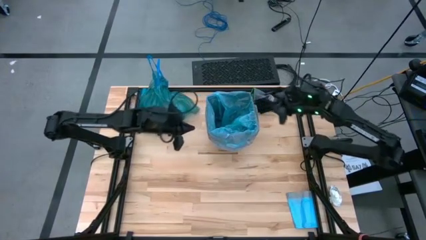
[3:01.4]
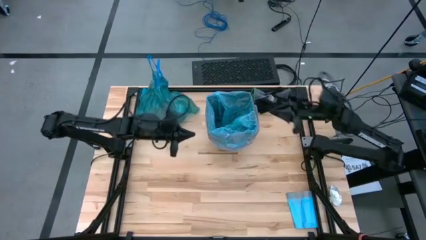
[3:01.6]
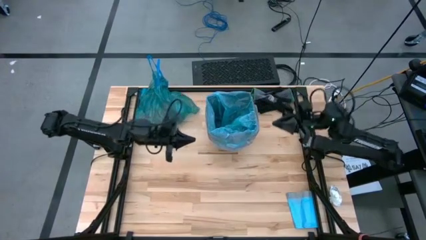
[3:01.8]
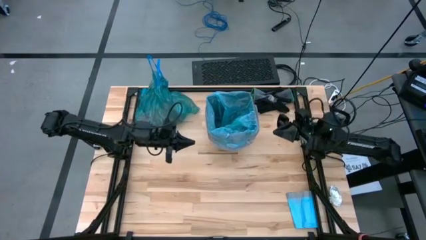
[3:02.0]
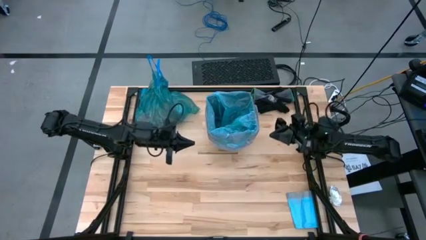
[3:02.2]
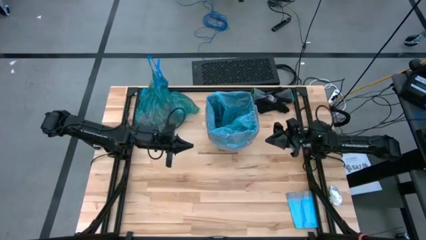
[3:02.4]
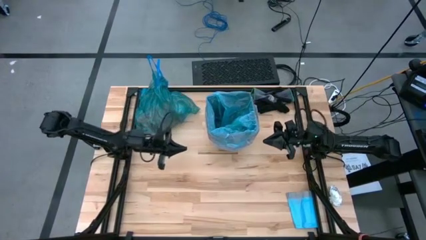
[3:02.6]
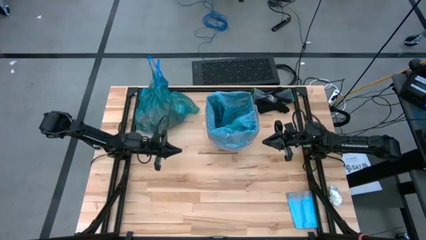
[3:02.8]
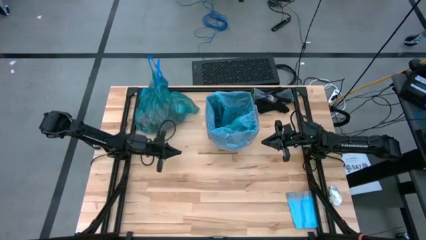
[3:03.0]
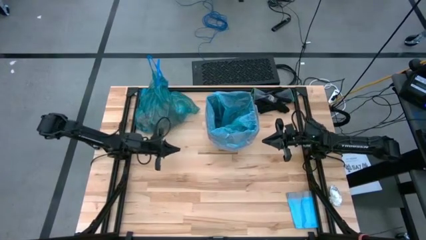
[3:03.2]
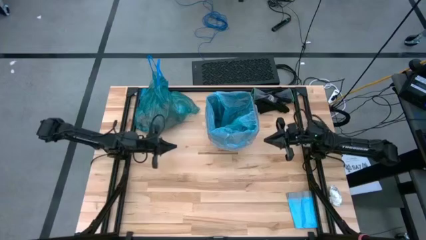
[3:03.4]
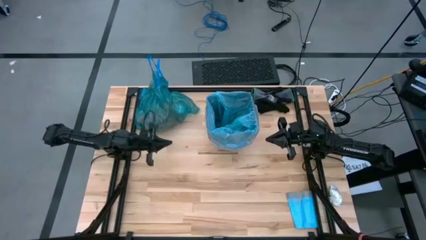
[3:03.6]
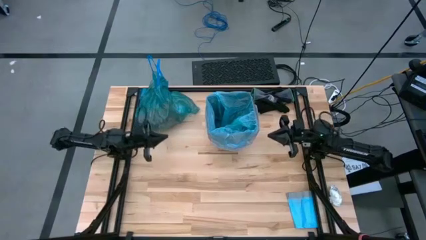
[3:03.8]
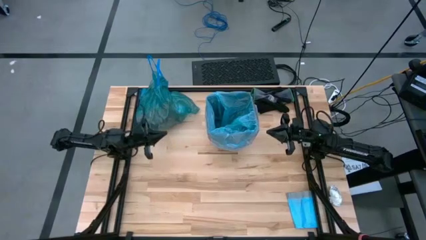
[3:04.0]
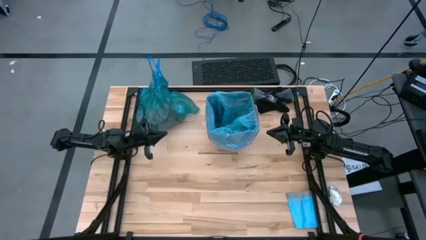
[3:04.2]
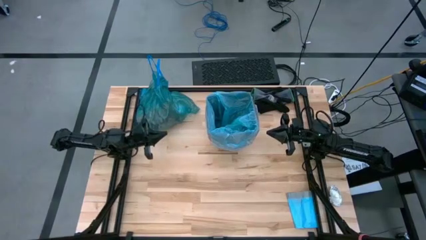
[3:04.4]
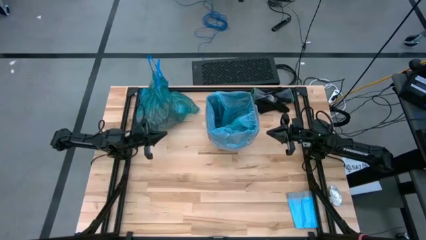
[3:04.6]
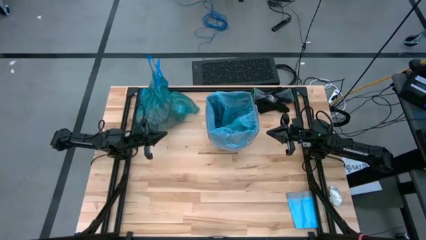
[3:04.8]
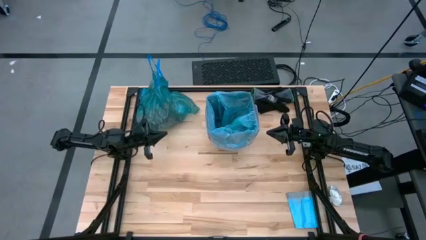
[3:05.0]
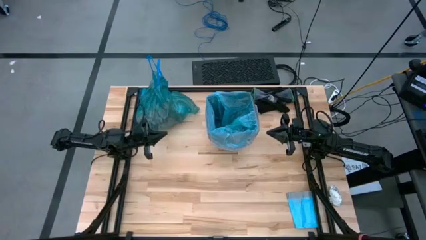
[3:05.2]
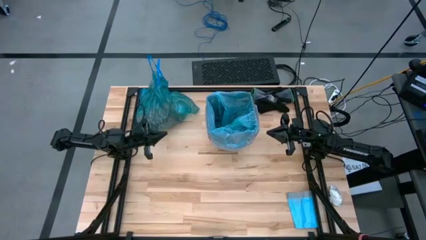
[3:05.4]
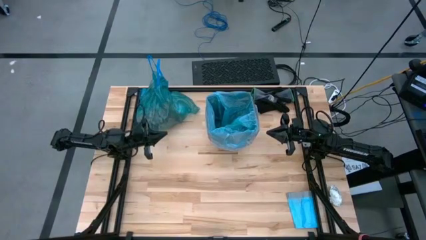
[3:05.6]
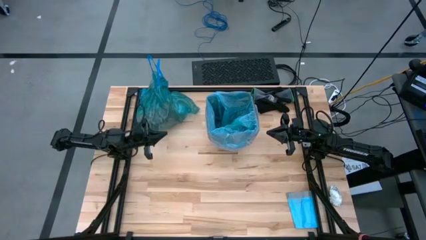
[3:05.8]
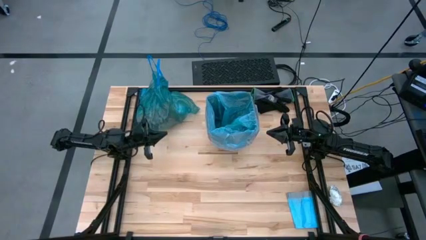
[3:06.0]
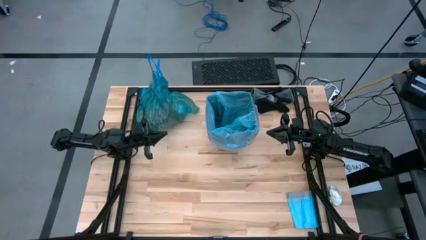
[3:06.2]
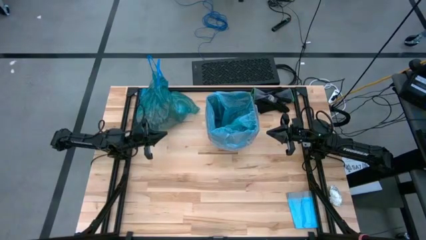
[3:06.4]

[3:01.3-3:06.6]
Task: place trash/remove bag and relplace
Return to Home Position

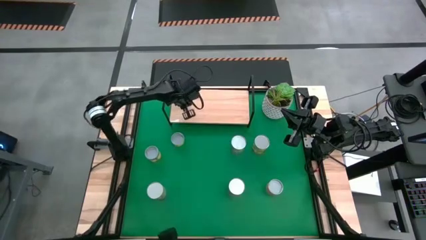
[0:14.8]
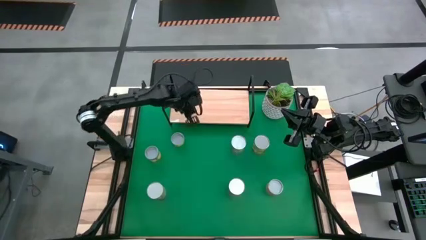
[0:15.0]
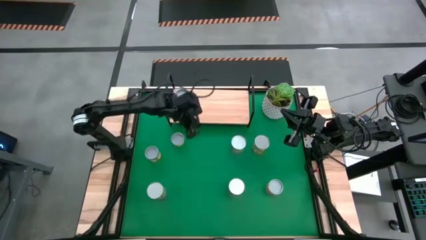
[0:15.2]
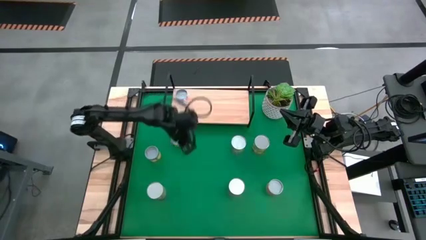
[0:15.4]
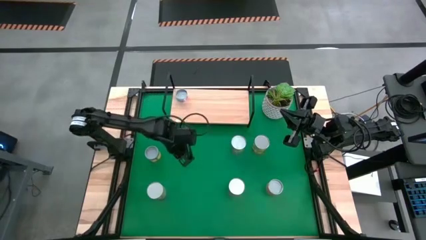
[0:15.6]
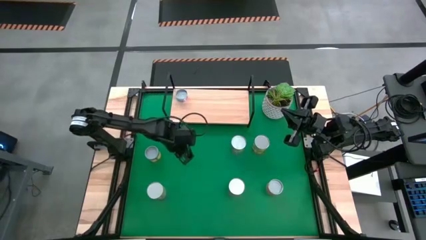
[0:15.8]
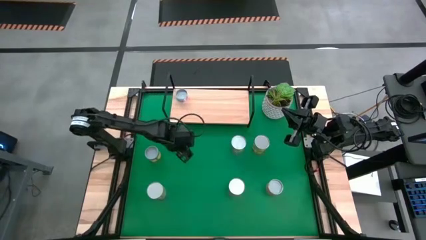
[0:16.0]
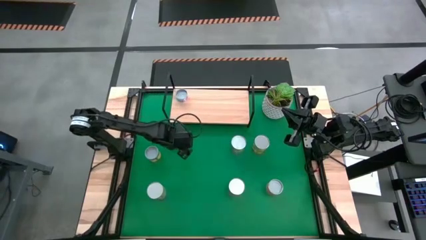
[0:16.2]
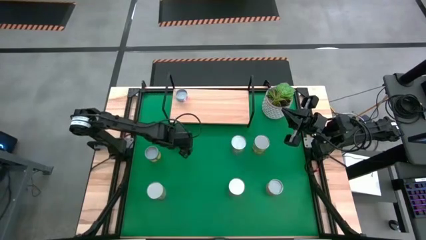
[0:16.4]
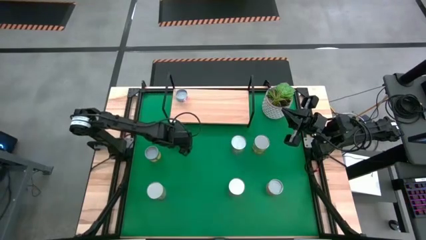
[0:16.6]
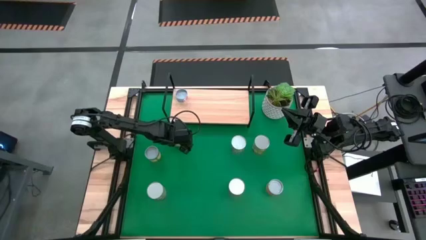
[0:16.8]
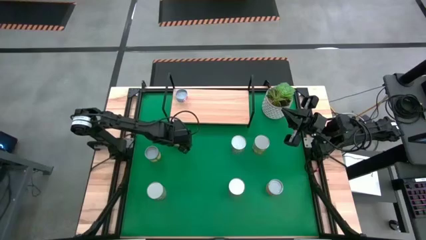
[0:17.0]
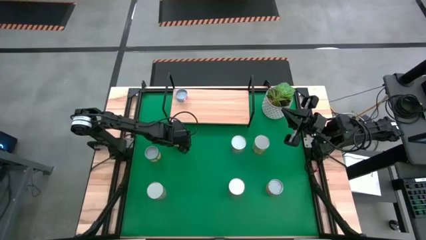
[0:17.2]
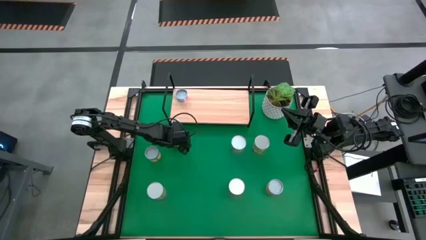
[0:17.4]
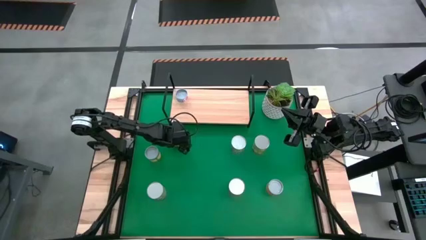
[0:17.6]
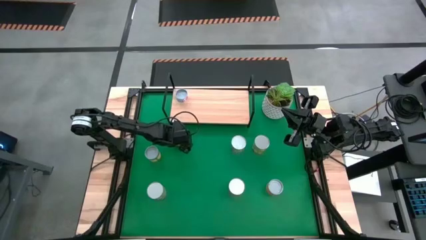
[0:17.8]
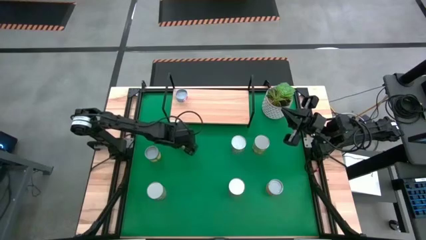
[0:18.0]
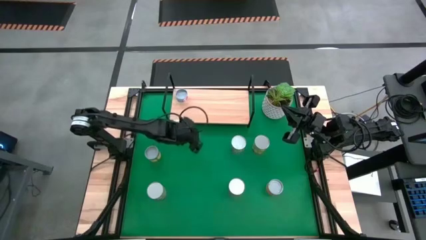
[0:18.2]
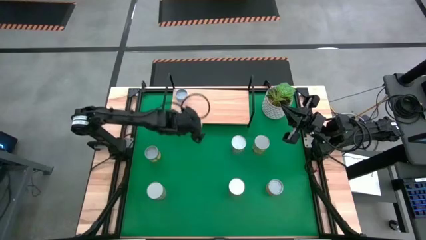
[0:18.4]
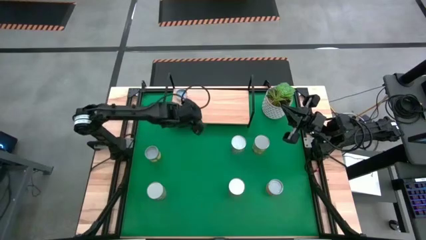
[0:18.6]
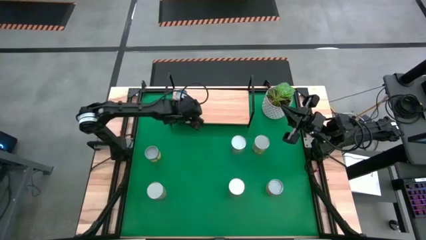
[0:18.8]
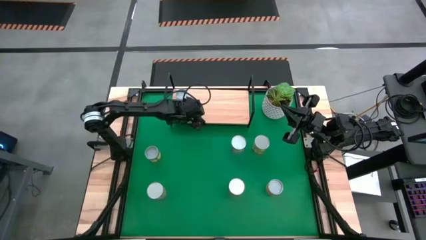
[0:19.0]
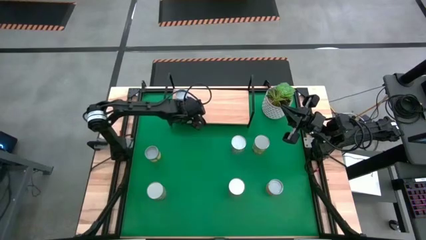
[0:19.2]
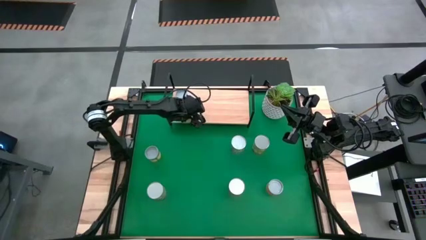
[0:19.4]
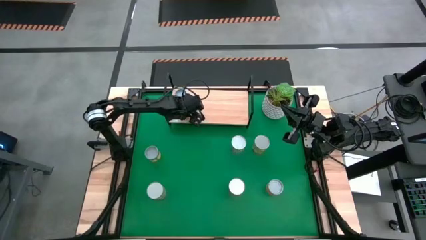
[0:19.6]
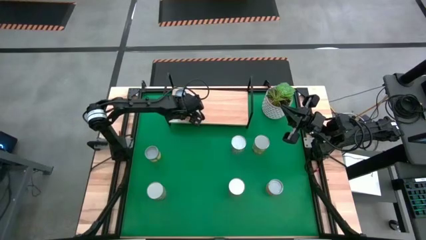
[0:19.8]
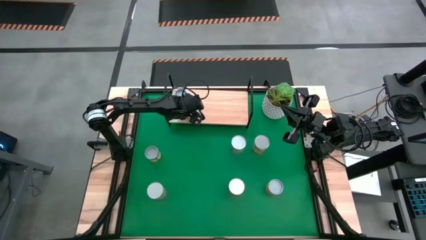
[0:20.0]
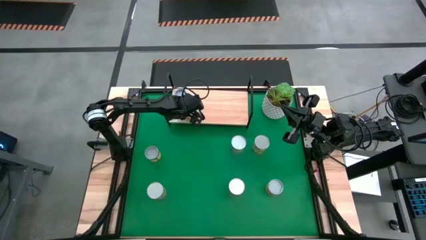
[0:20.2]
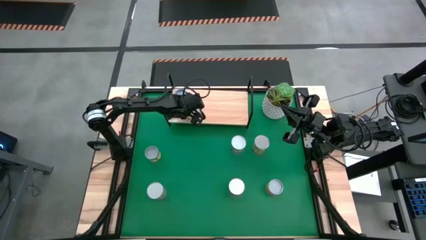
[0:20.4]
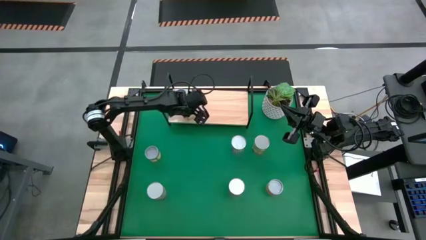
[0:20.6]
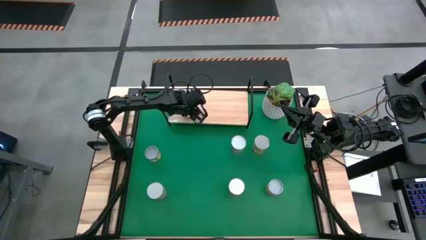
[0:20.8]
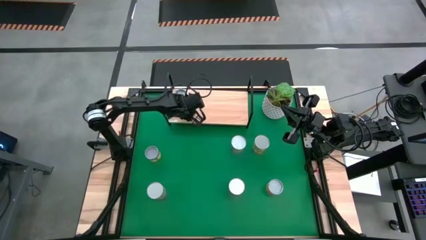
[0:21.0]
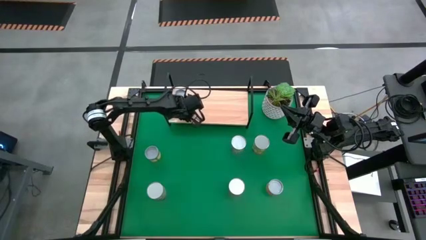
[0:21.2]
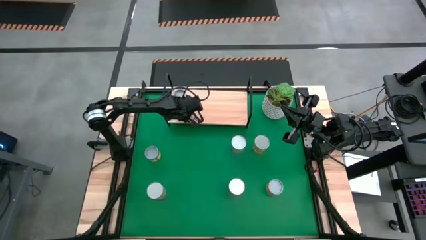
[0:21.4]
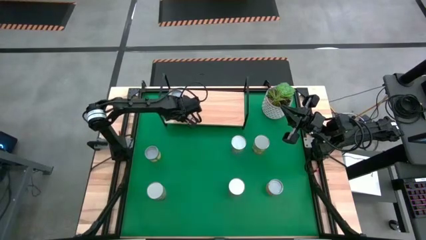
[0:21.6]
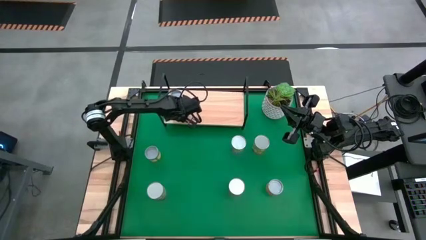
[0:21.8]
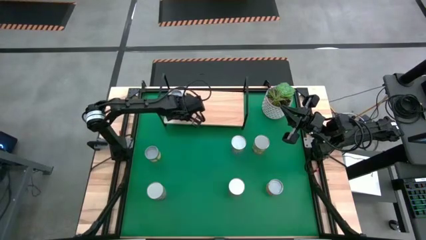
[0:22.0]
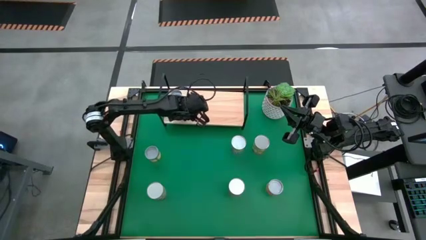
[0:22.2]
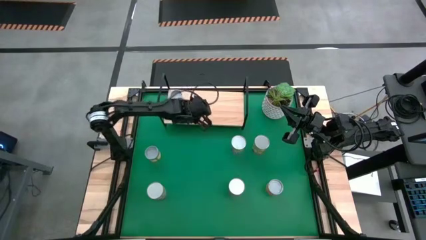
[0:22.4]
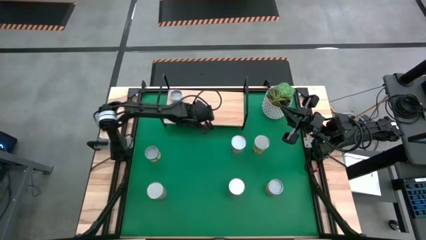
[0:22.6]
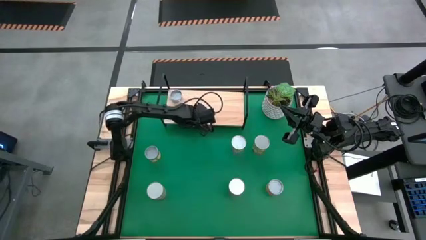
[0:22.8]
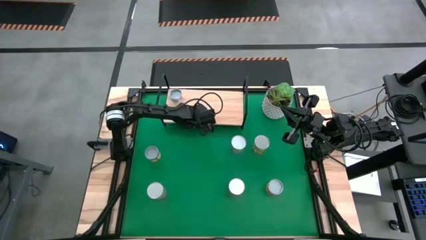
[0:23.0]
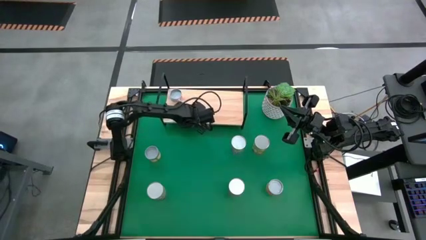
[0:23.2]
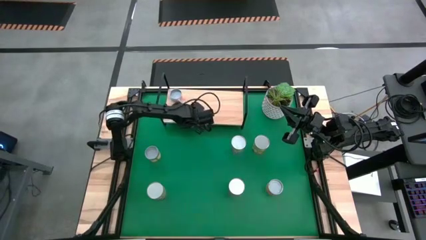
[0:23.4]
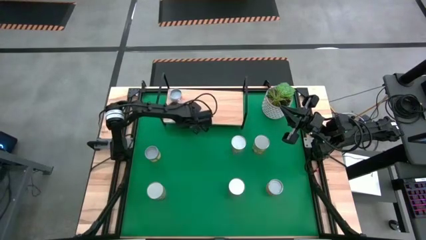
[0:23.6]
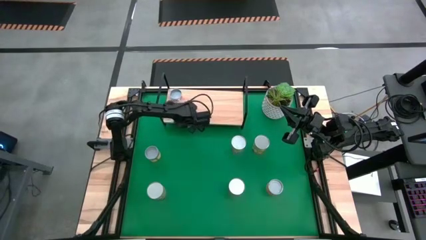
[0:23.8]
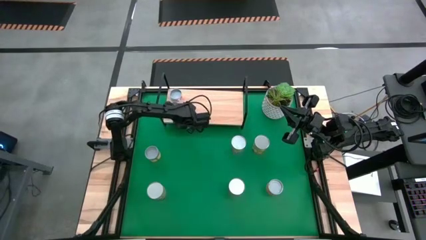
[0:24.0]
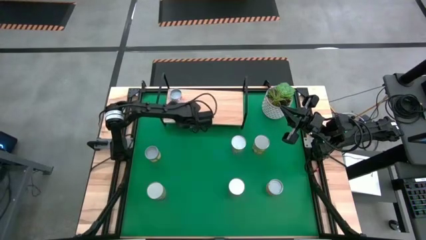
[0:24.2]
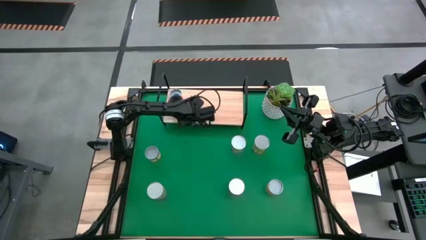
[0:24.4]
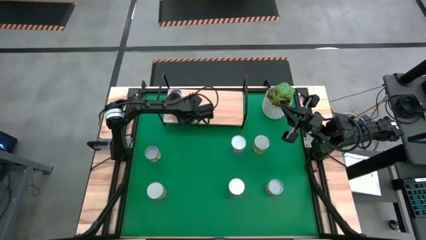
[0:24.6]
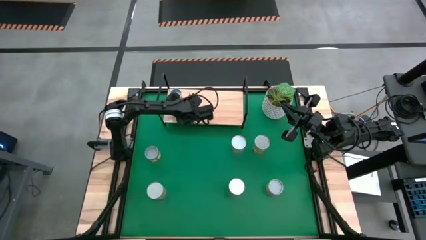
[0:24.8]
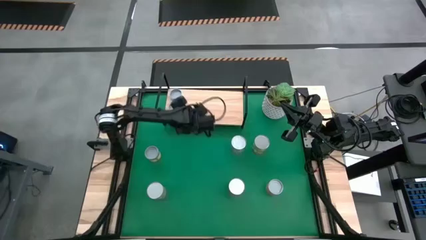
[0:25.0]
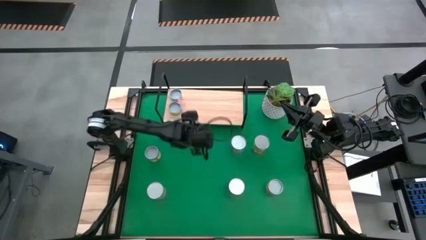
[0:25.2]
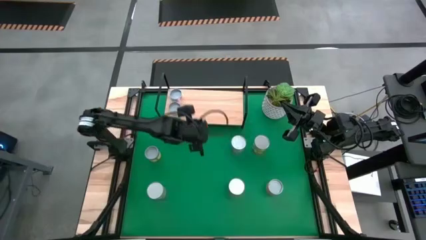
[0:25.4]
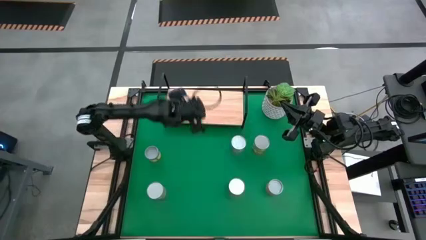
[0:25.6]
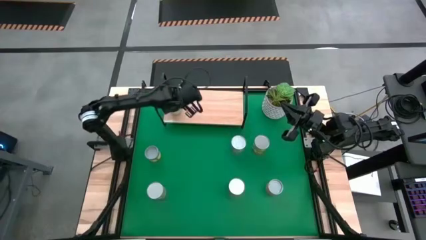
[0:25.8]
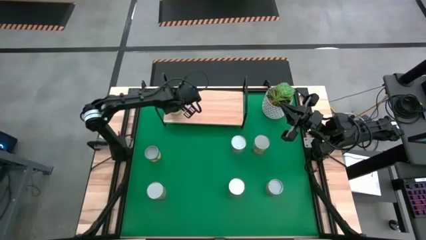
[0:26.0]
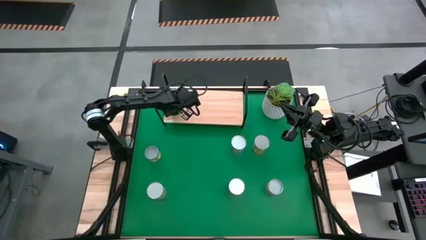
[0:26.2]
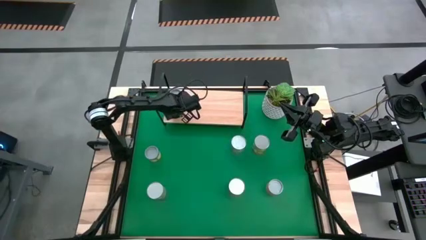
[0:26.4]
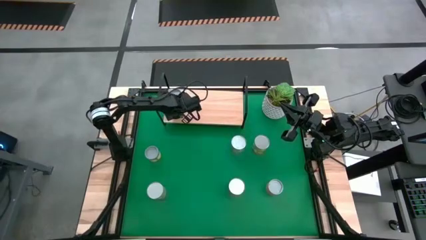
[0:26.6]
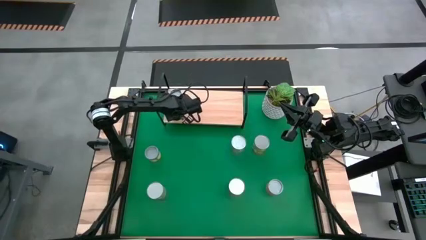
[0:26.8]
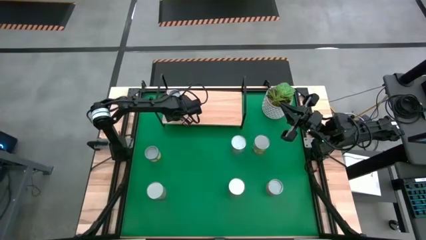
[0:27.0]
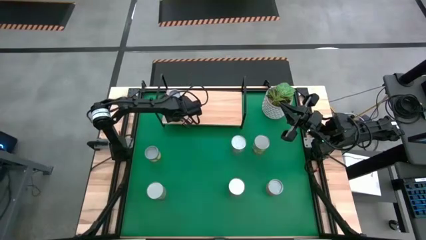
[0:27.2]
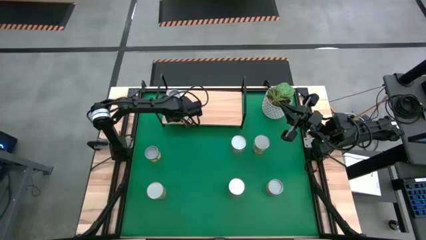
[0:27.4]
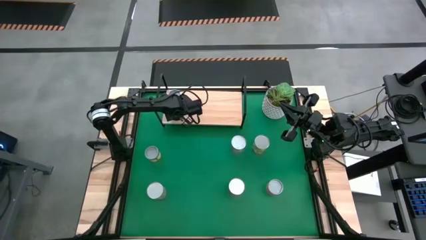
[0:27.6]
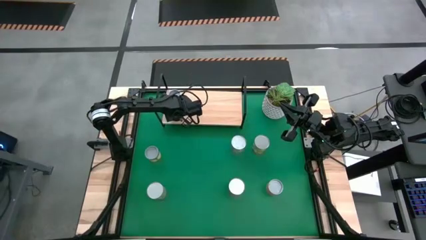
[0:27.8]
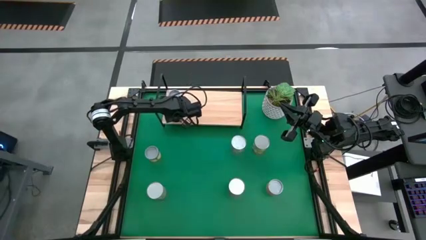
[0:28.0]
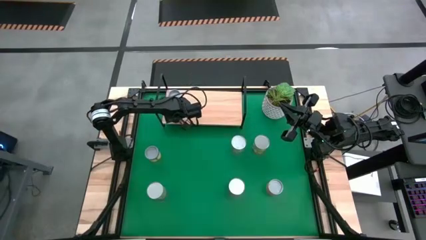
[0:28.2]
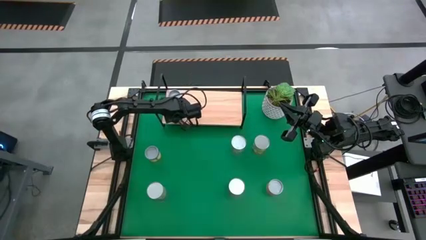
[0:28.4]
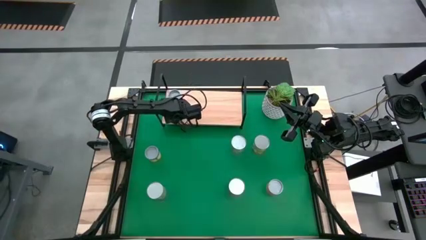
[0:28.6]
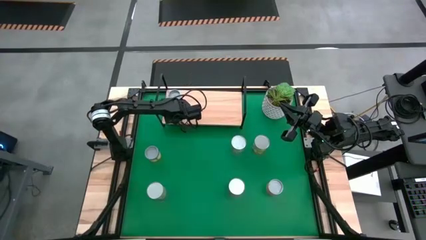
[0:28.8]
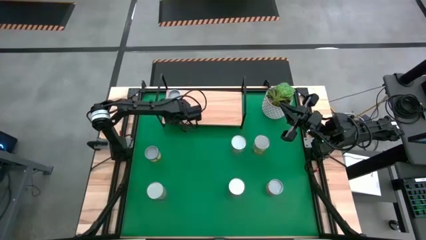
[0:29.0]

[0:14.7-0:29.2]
Task: Pick and place cans onto a shelf
Put the canned mushroom good on the shelf
